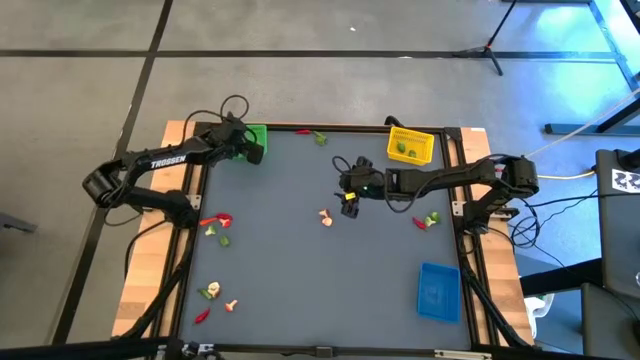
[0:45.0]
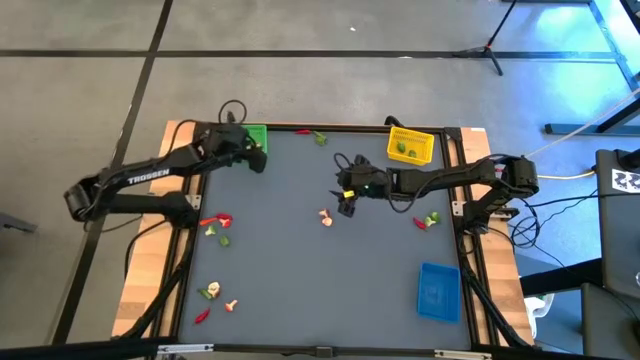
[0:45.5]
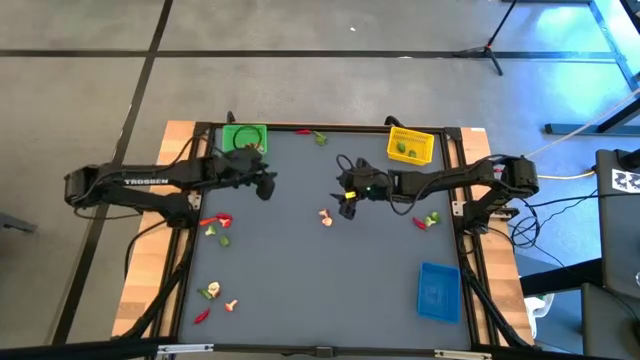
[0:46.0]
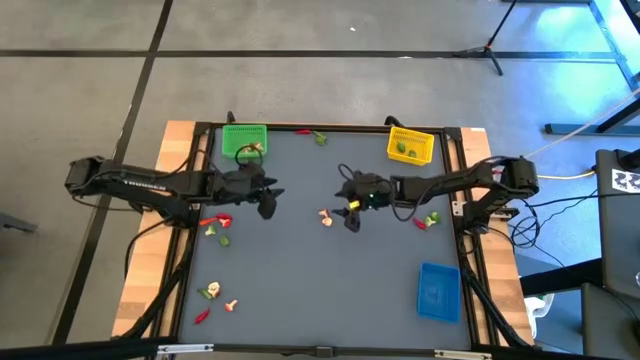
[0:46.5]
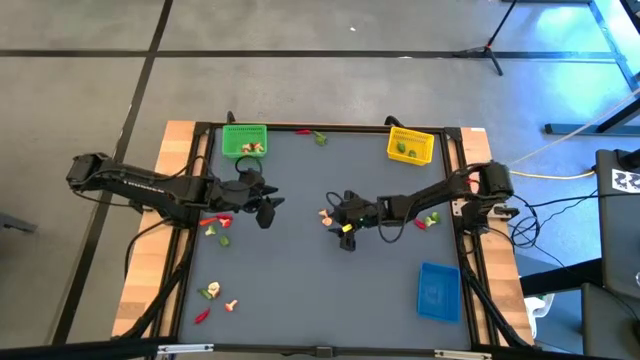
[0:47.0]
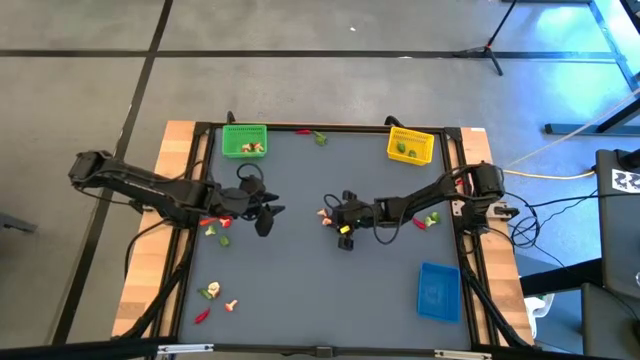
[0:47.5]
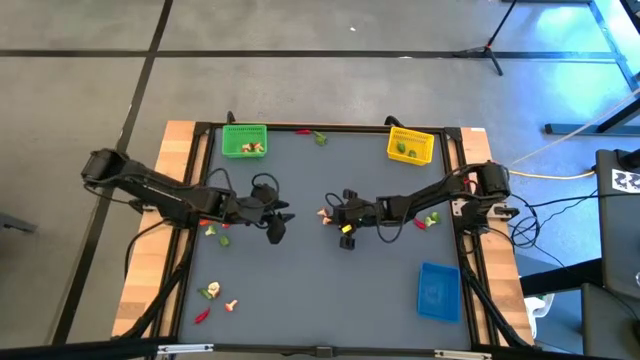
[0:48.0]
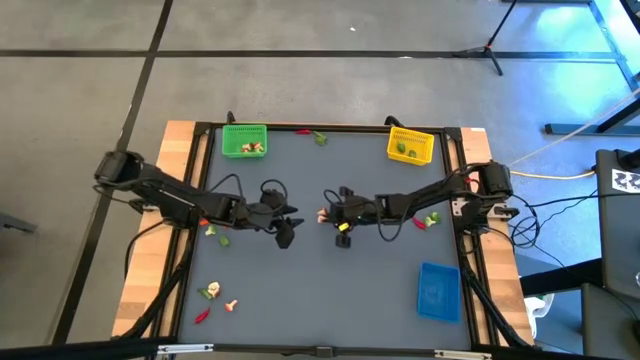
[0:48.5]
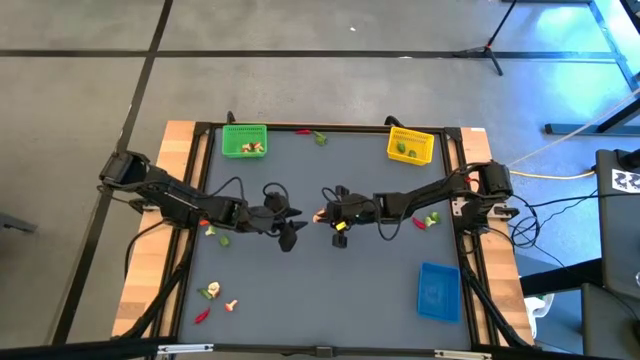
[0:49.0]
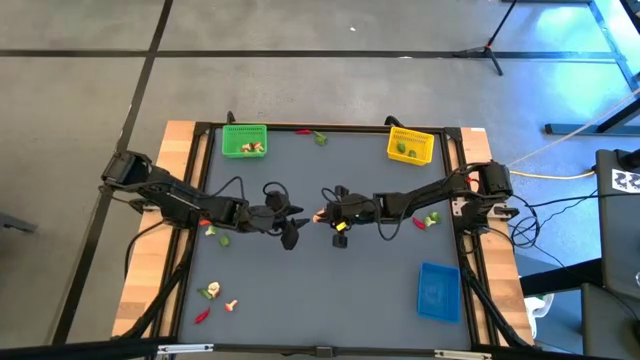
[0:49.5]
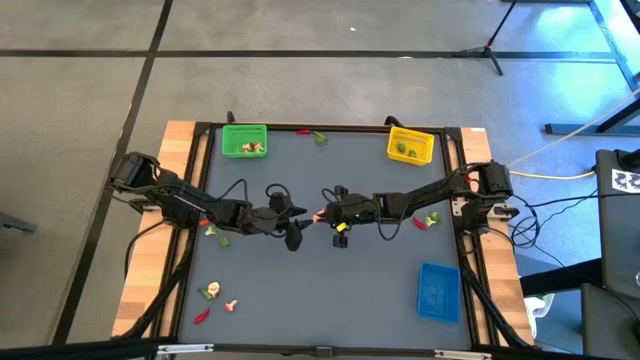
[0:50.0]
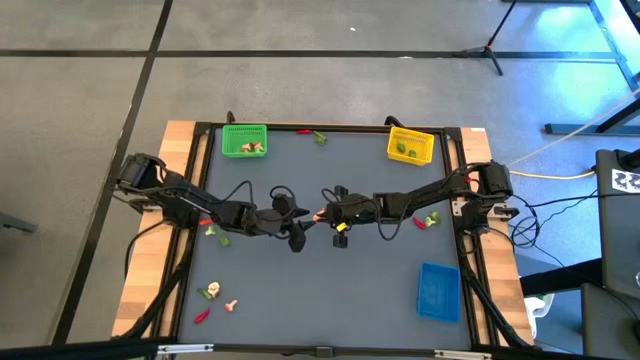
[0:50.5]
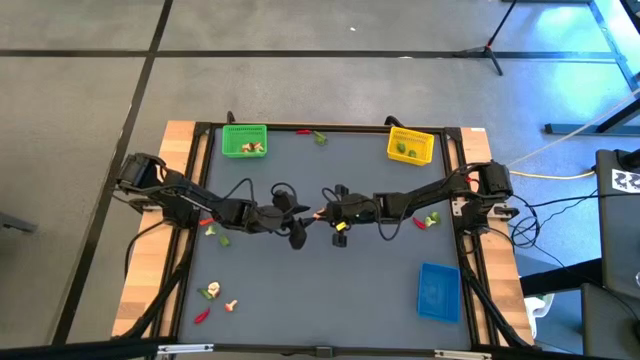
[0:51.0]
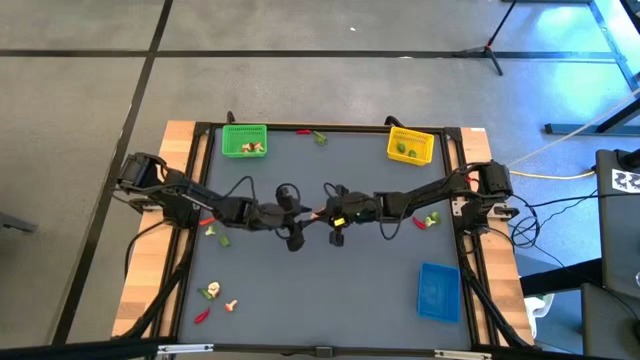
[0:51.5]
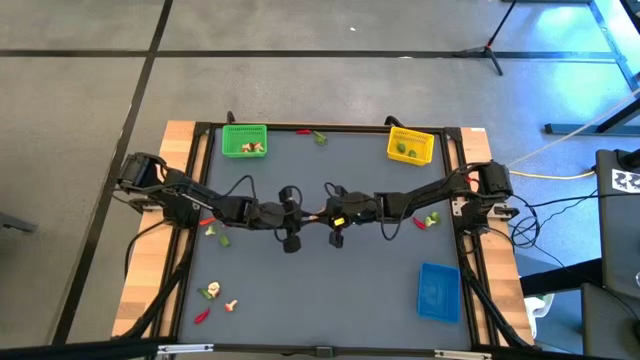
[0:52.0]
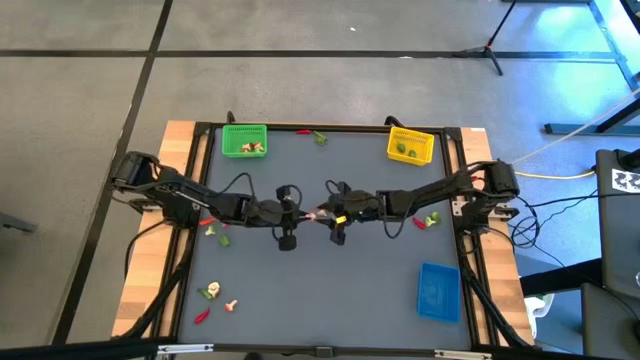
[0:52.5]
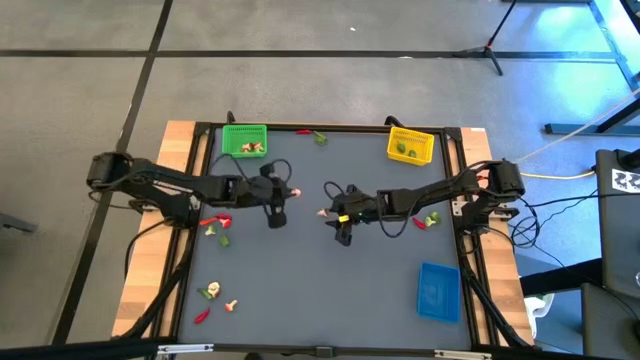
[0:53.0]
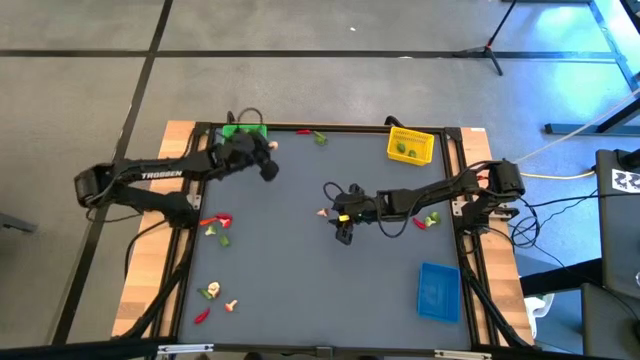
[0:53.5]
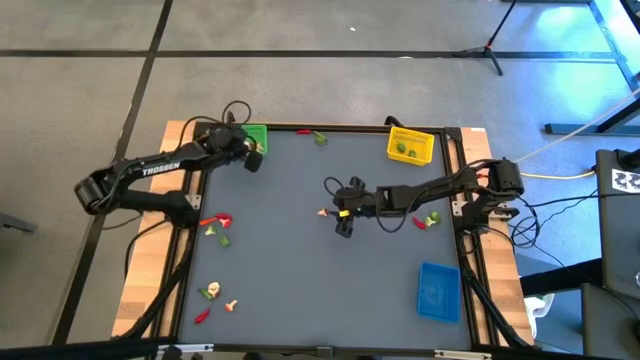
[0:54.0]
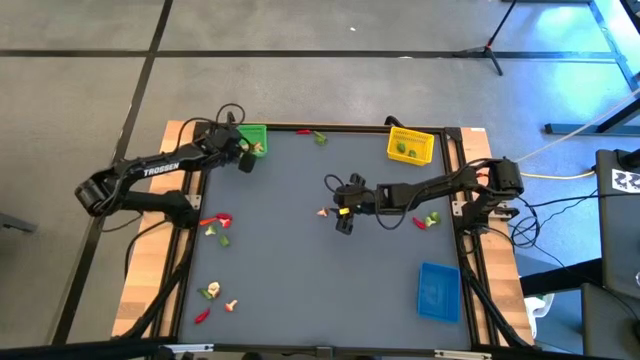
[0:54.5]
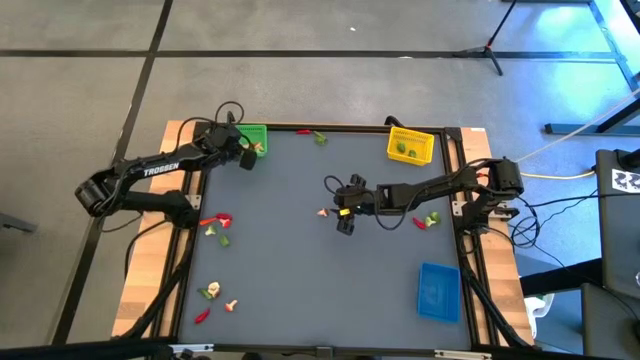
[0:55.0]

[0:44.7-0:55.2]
Task: Sort produce into baskets
Put the brown mushroom into the green bin

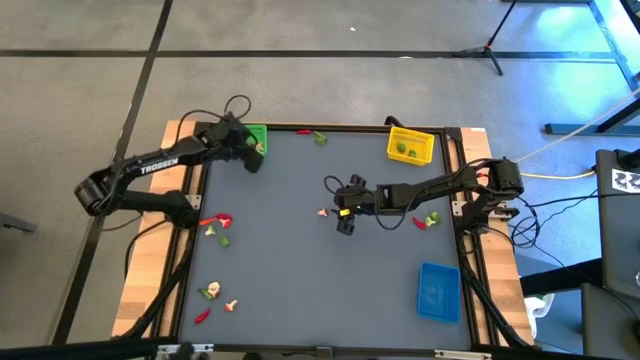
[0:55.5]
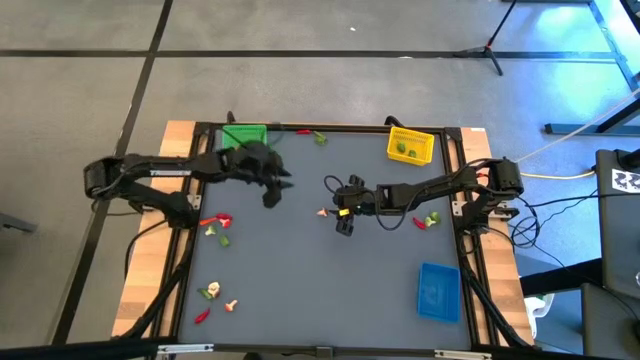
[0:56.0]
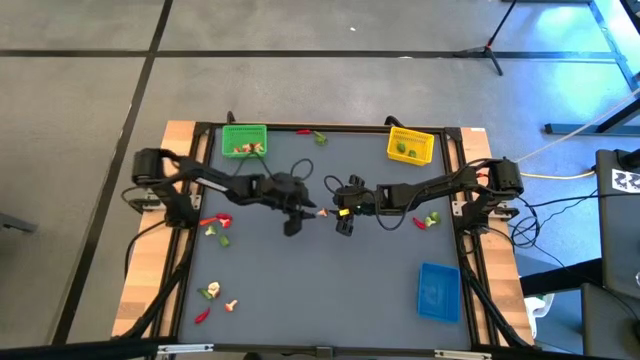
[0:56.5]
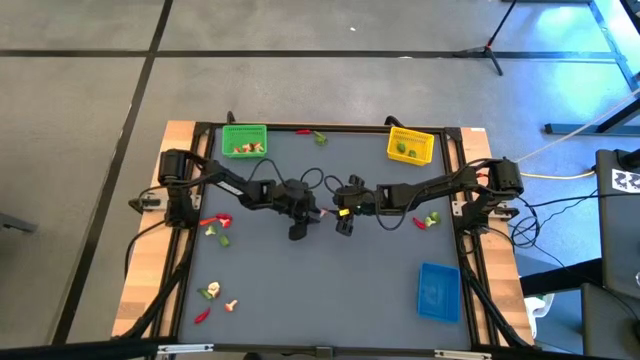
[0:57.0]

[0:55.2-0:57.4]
Put the brown mushroom into the green bin

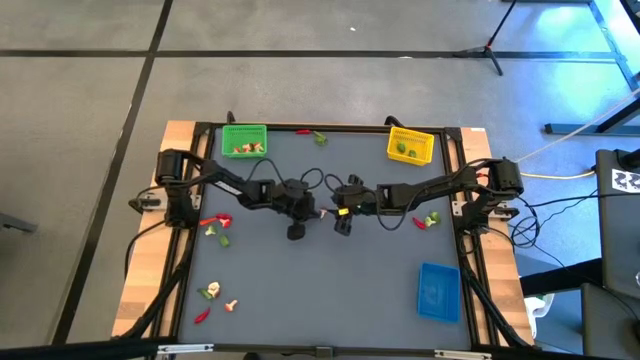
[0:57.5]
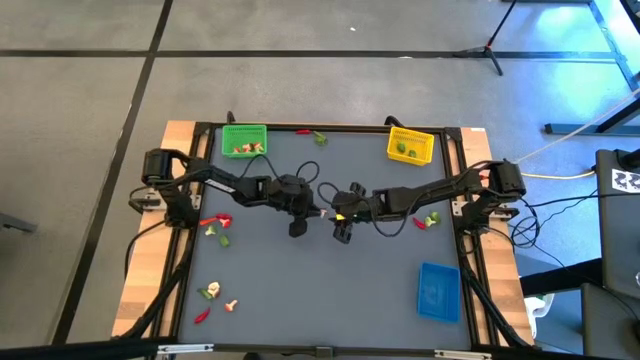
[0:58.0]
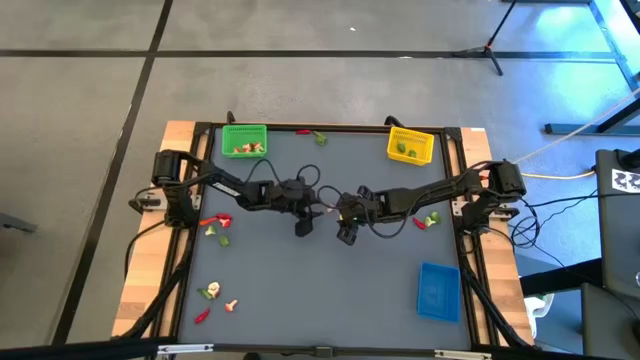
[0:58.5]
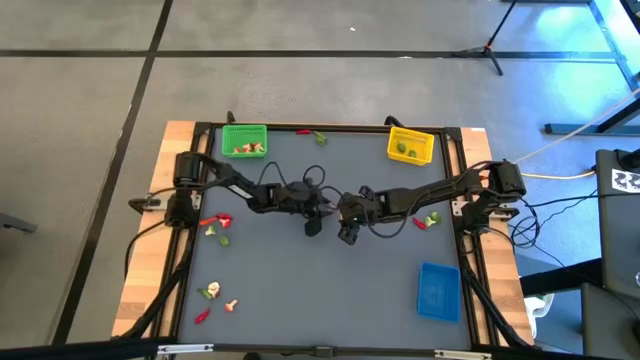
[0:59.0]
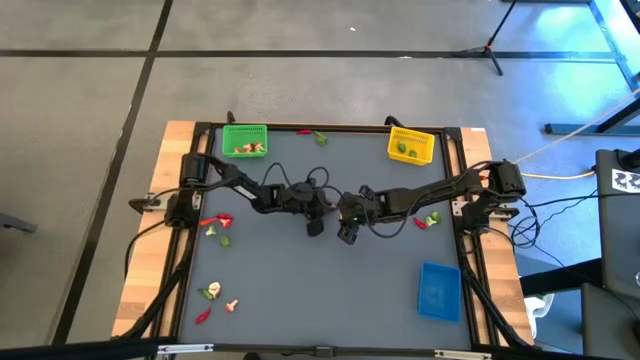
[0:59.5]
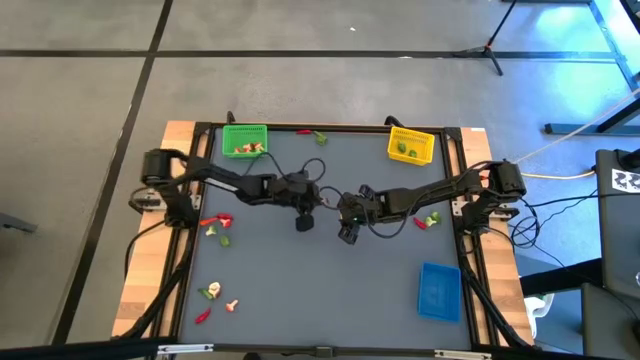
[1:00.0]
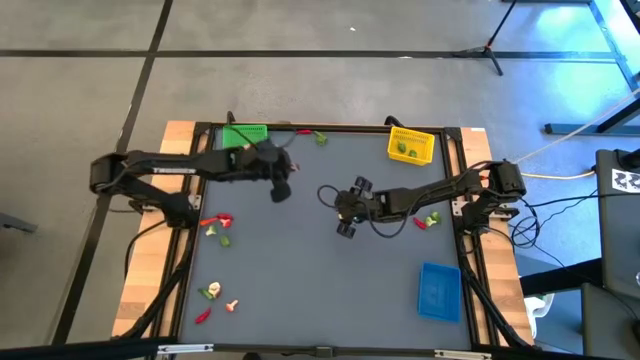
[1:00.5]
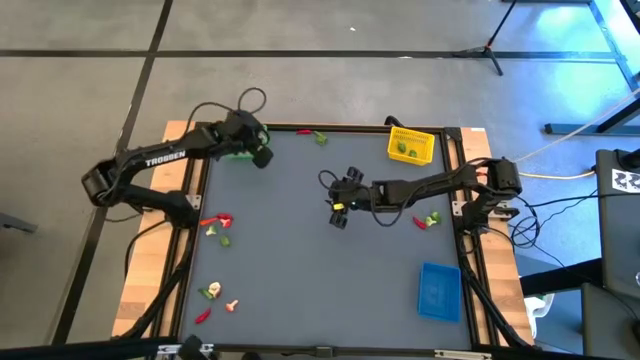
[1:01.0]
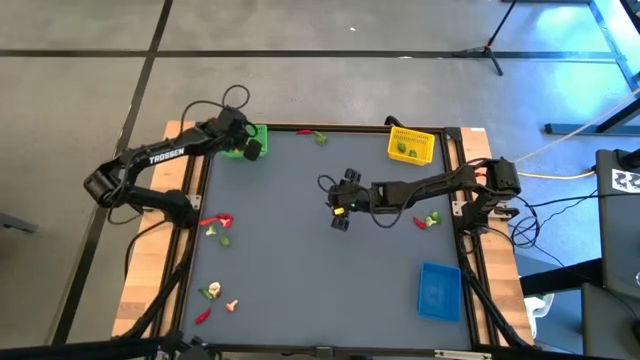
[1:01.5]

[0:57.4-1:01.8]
Put the brown mushroom into the green bin

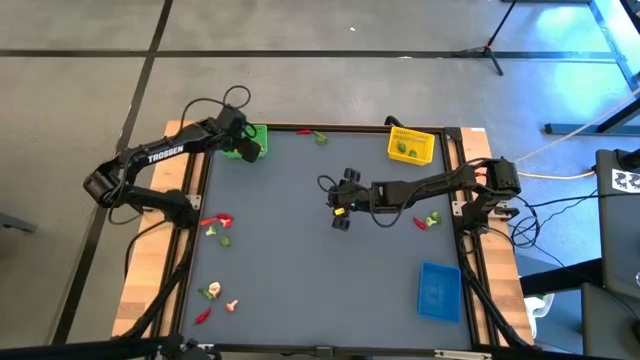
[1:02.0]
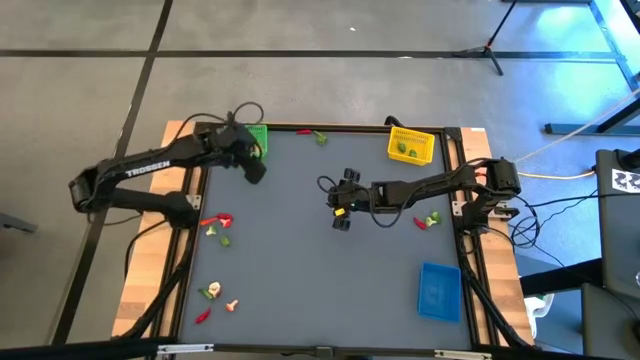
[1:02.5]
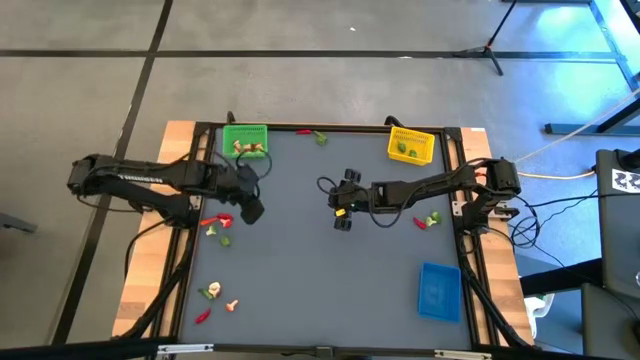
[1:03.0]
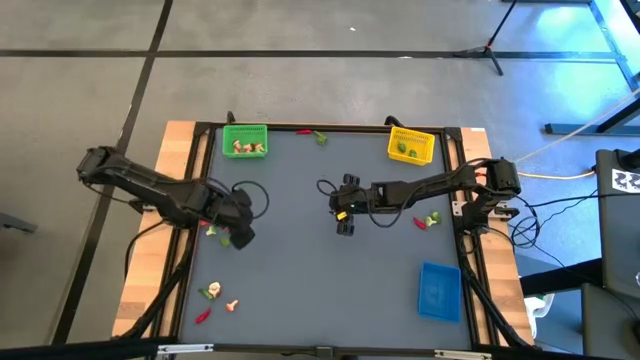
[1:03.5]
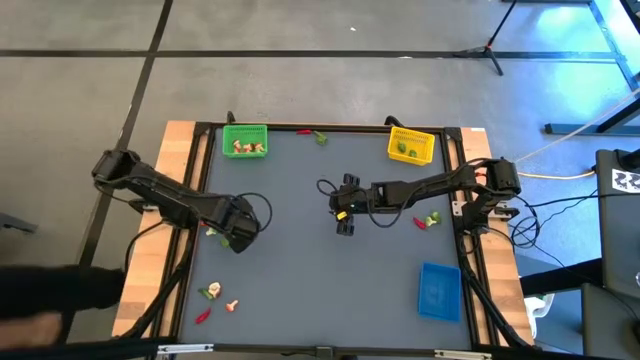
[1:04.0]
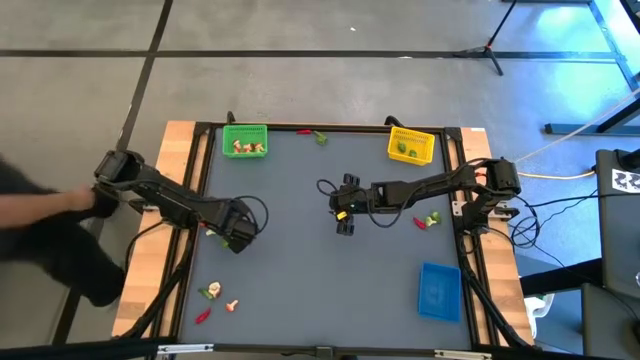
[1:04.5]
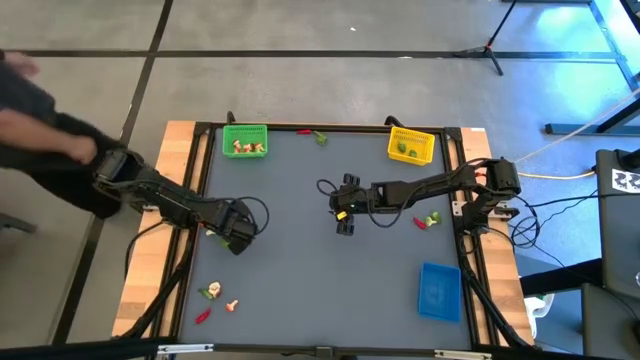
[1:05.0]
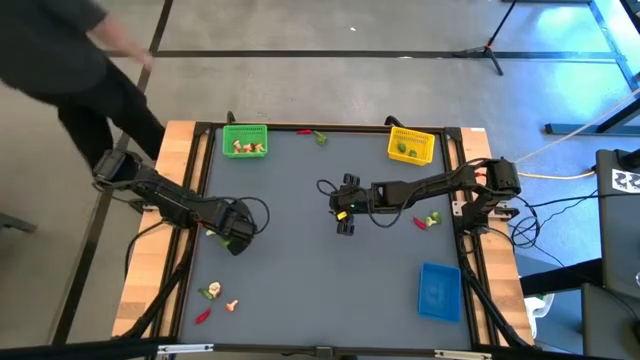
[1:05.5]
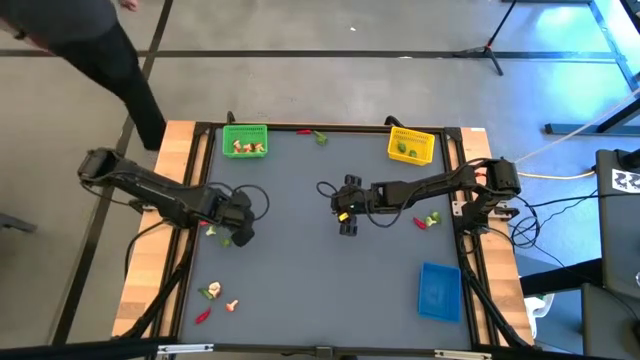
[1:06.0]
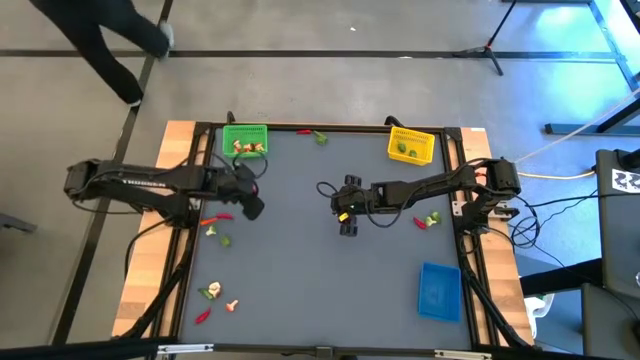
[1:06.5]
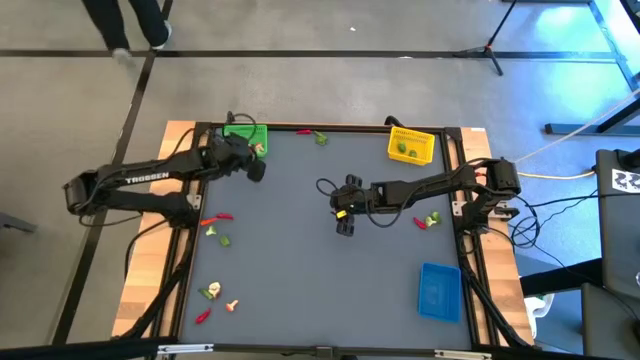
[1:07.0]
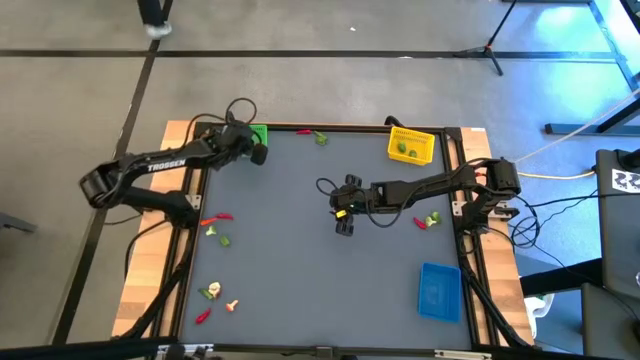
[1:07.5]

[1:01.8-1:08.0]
Put the red mushroom into the green bin
